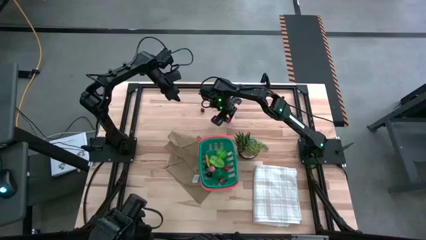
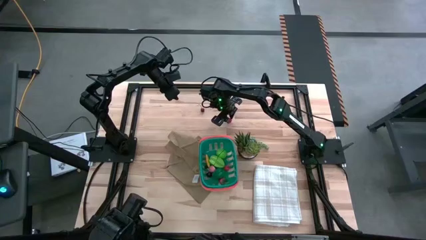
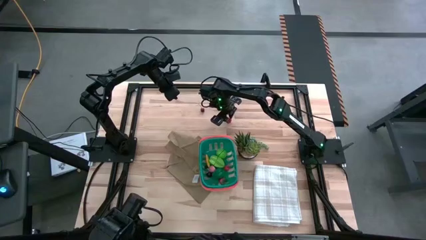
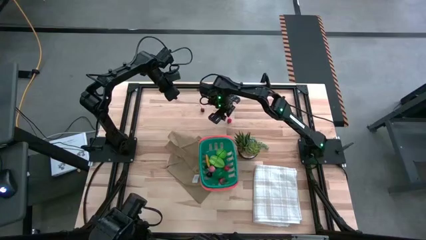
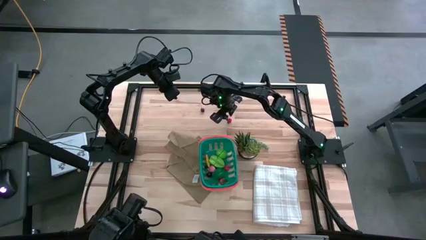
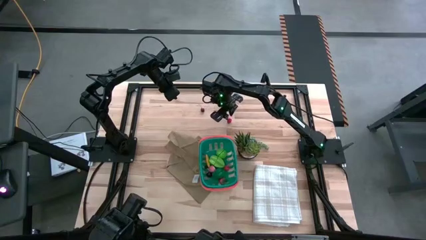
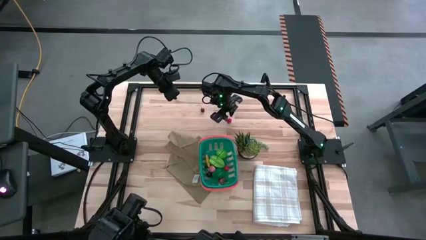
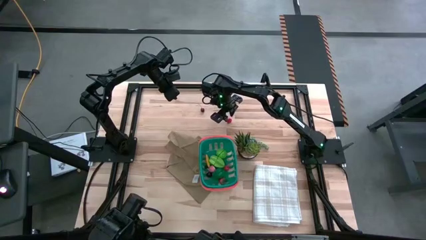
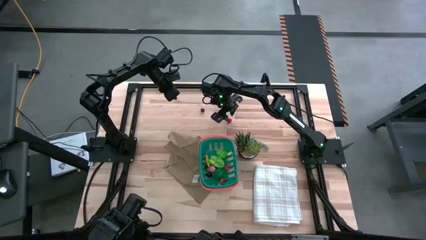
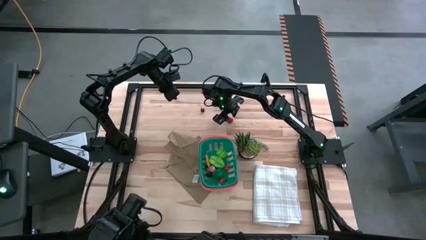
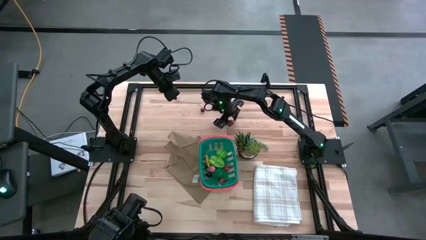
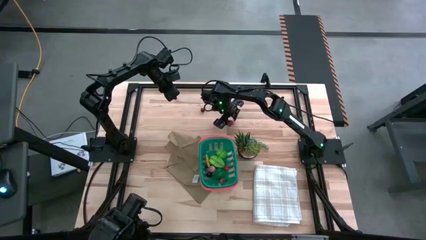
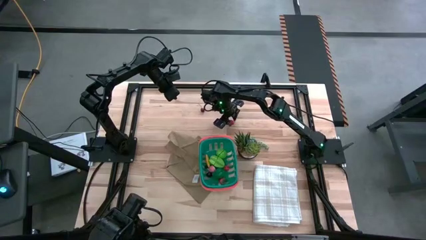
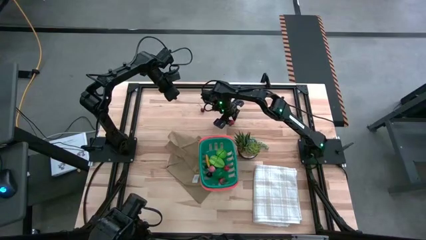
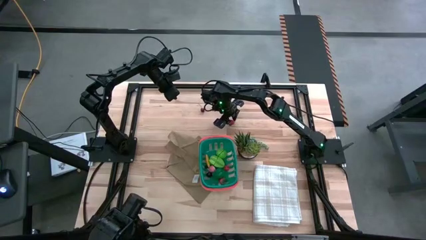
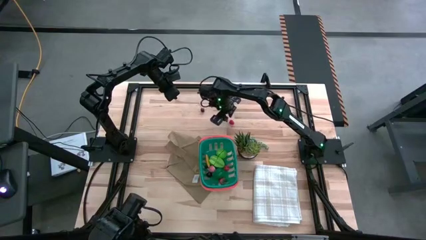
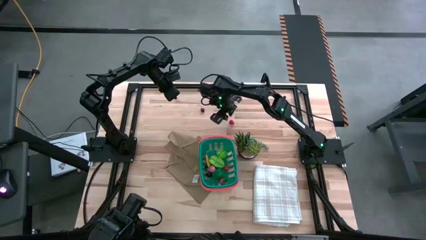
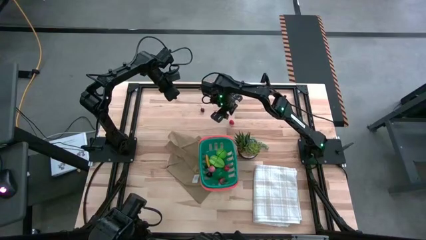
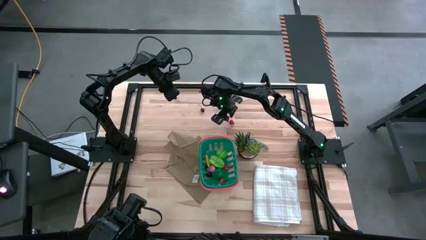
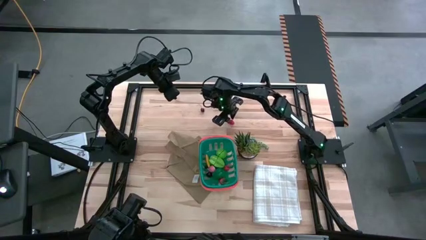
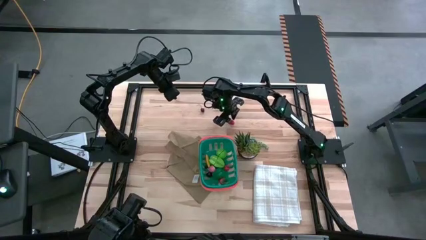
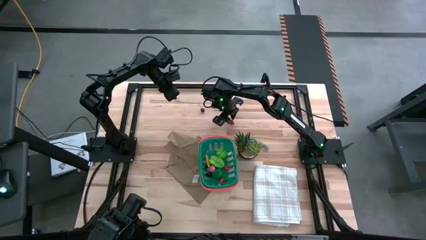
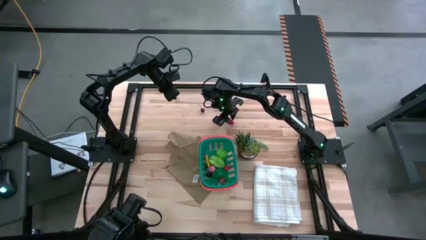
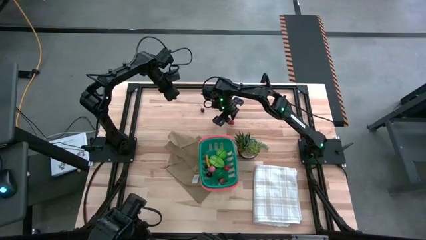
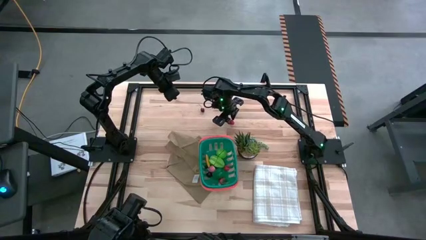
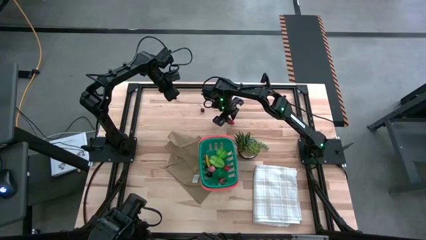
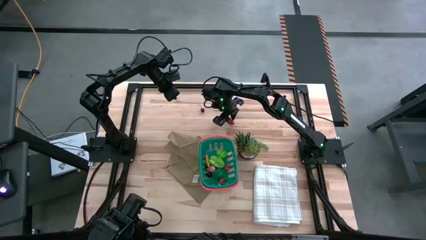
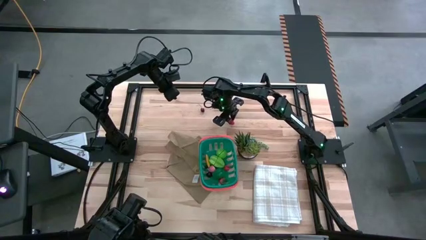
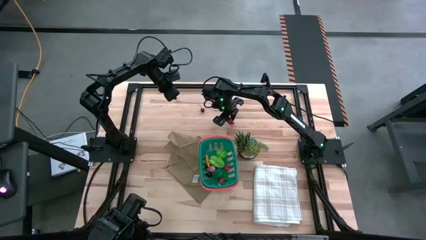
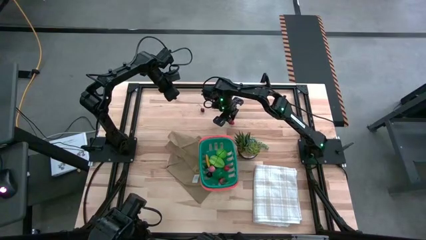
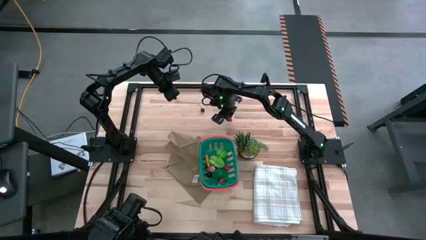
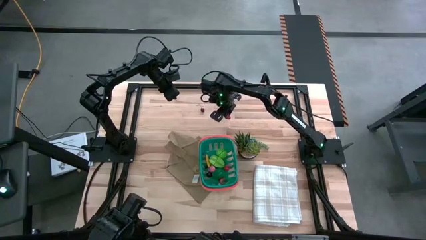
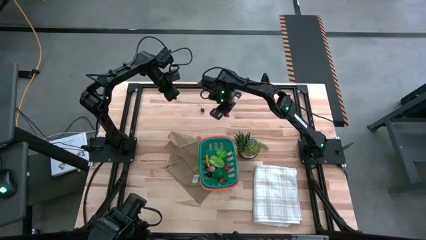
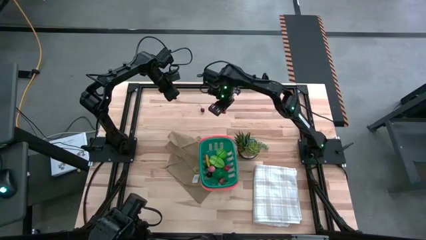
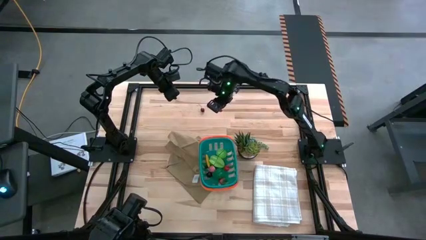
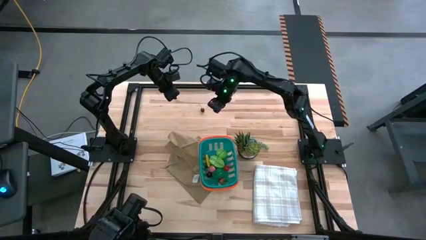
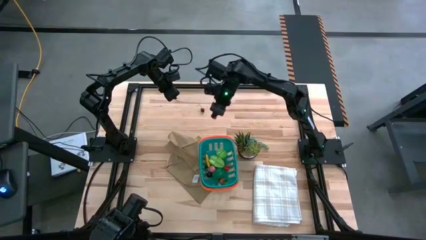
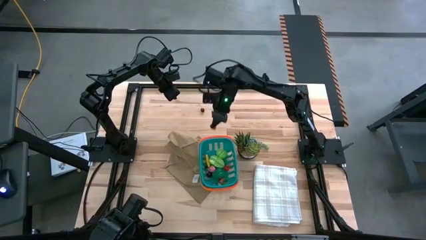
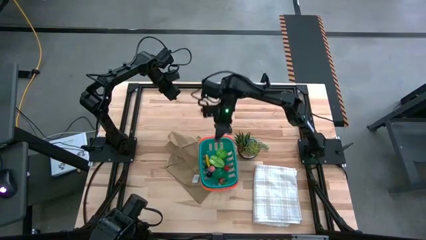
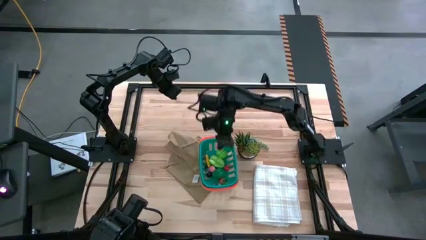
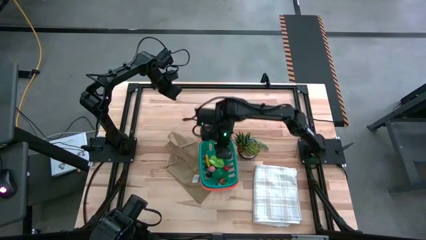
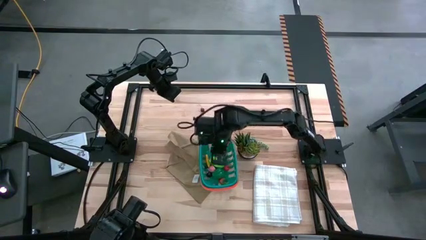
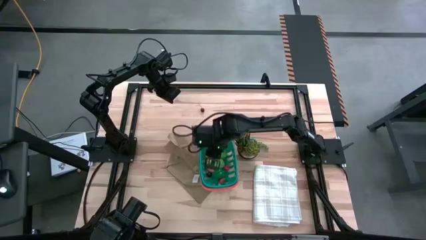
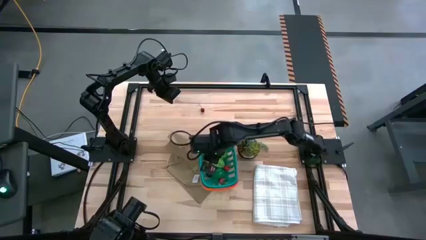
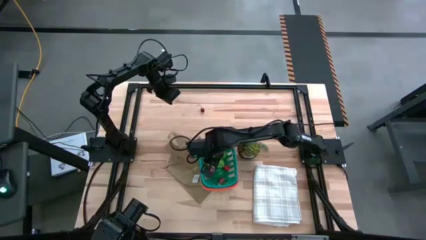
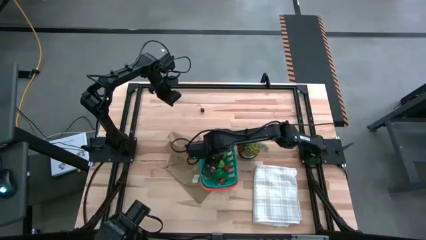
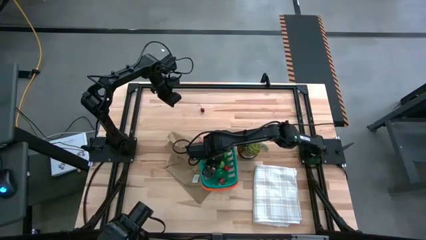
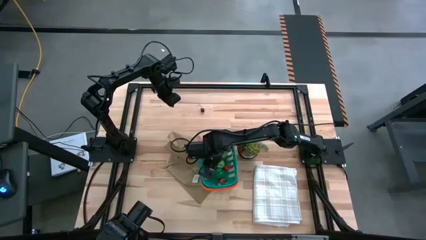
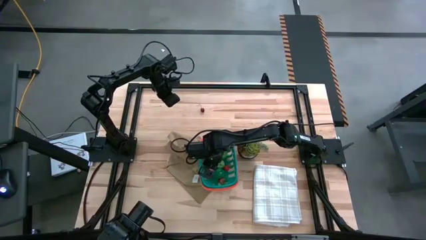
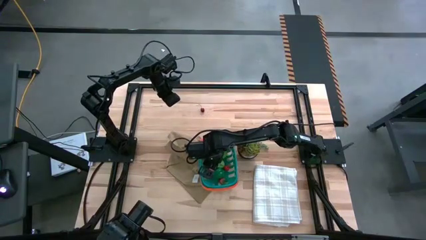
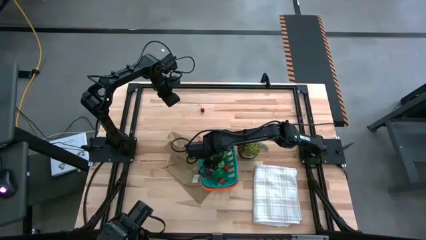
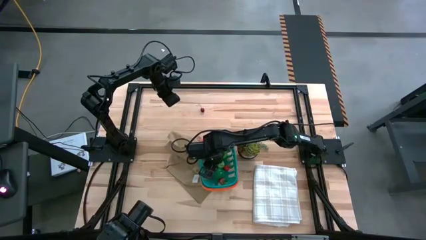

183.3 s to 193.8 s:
Task: Pick and placing Produce into tupperware
Put the red raspberry into the green basket
